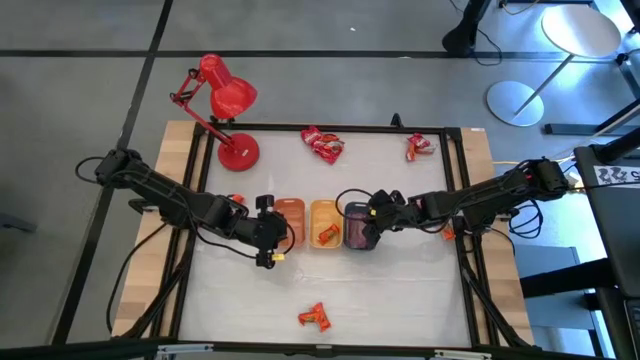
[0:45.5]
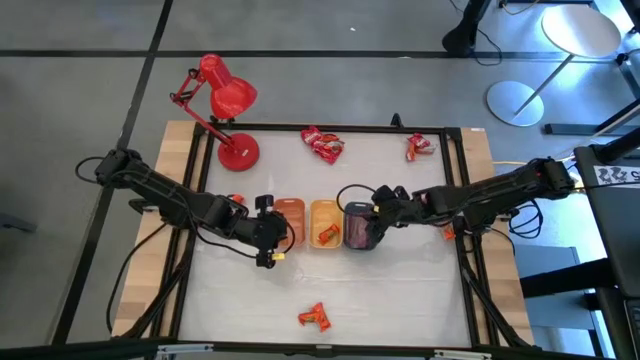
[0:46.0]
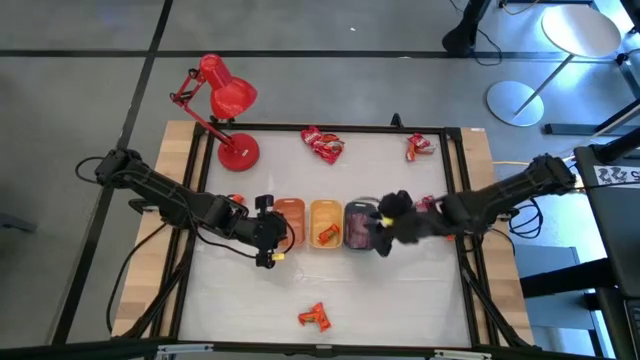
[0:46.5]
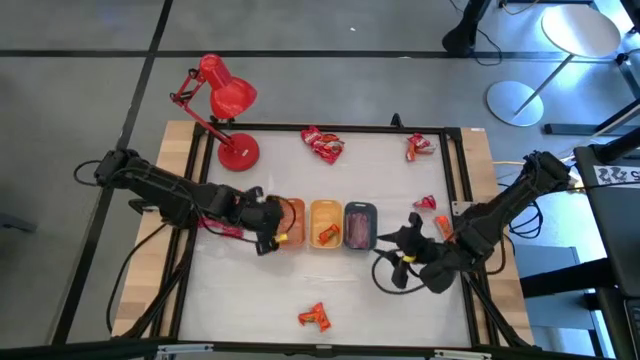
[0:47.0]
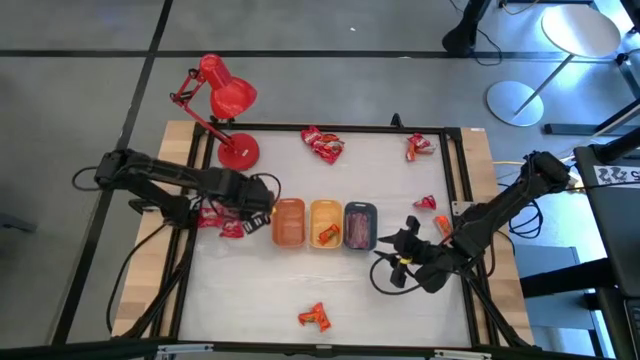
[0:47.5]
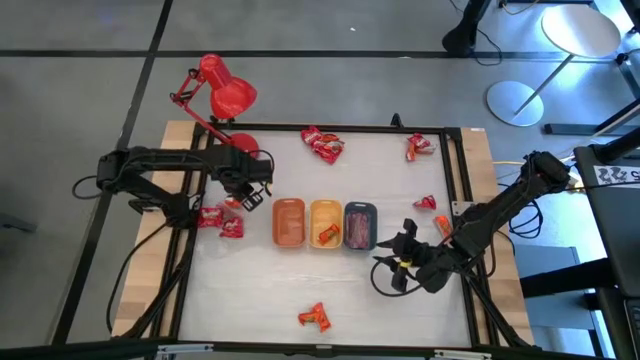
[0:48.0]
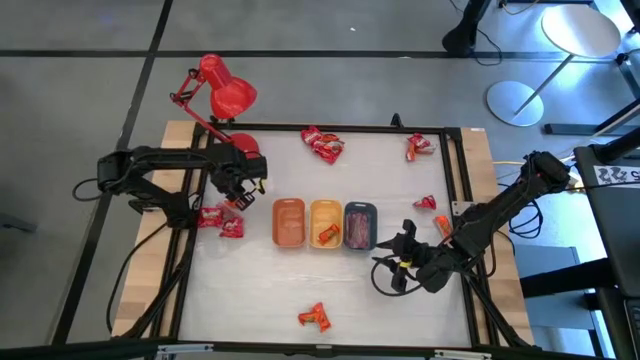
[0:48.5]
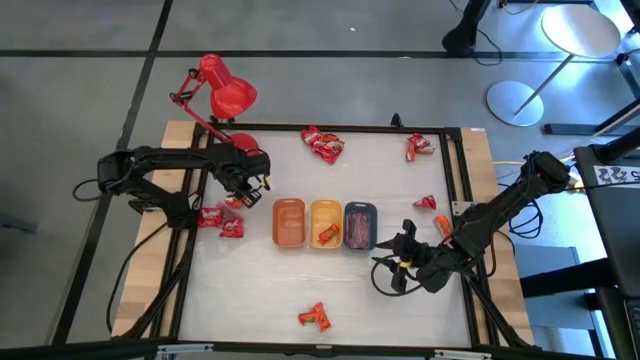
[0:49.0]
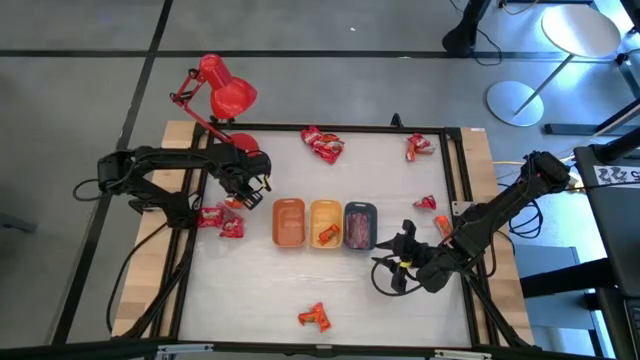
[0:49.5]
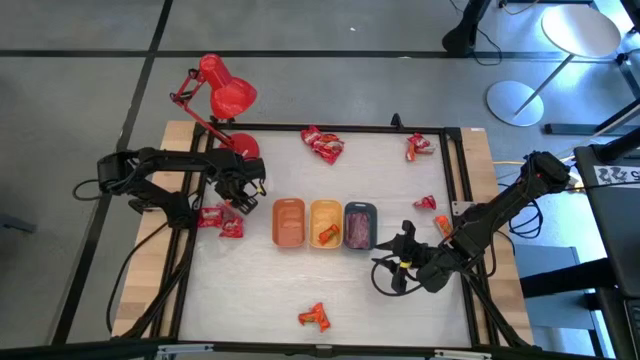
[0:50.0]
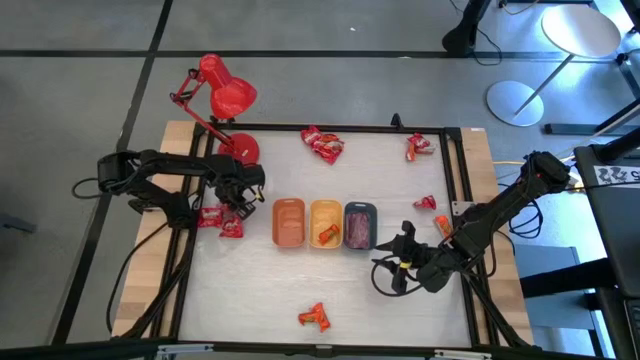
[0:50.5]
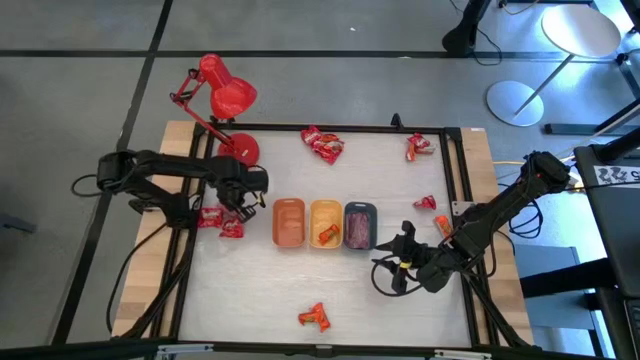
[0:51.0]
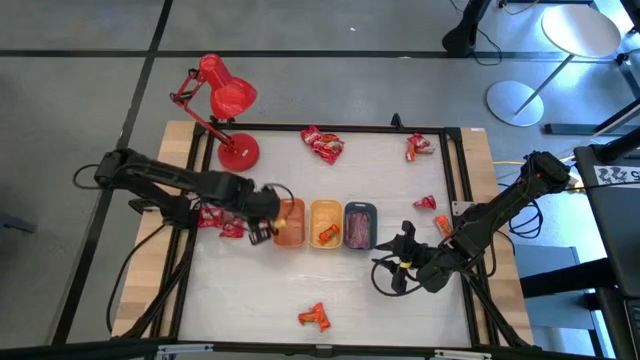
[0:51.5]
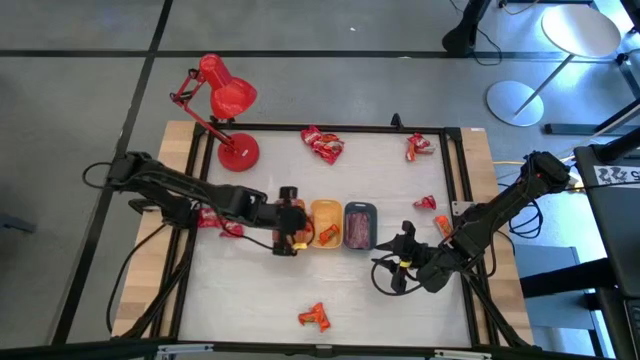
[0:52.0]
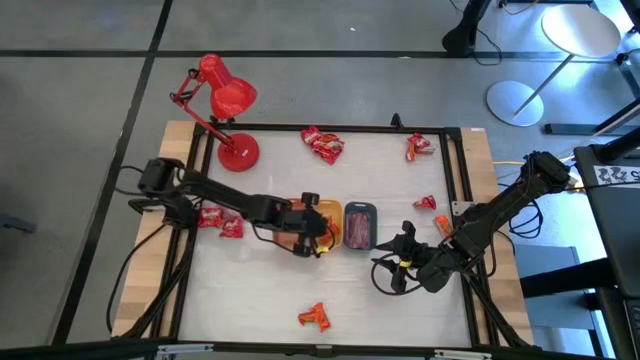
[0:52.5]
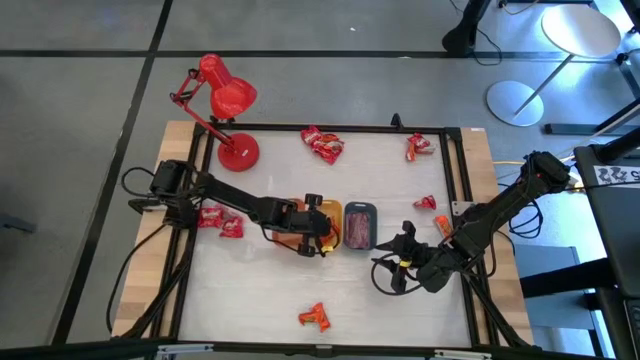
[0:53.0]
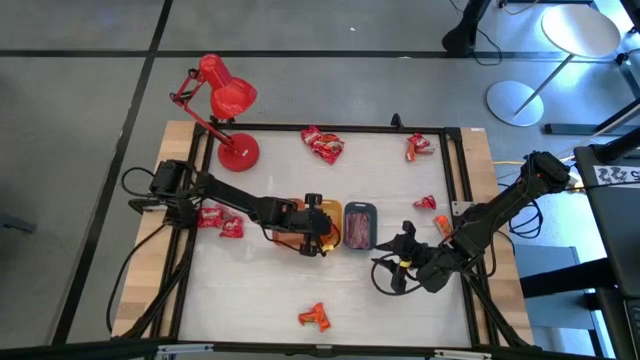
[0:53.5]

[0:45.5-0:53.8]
Task: Sort candy
Put the orange candy into the yellow bin

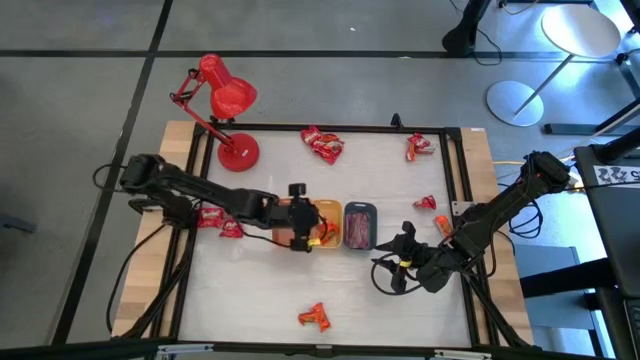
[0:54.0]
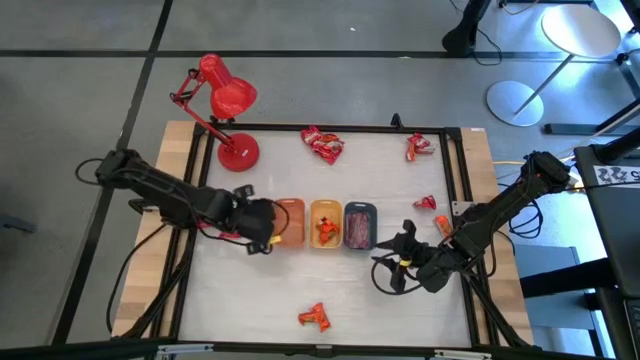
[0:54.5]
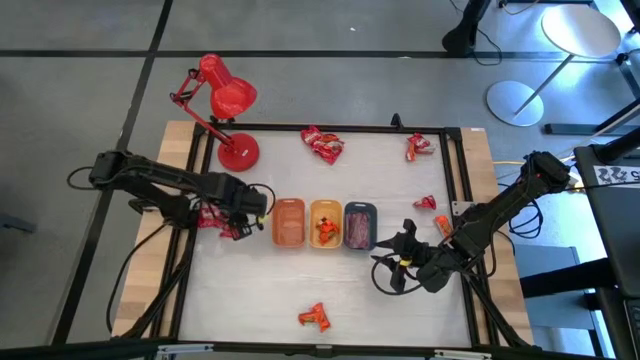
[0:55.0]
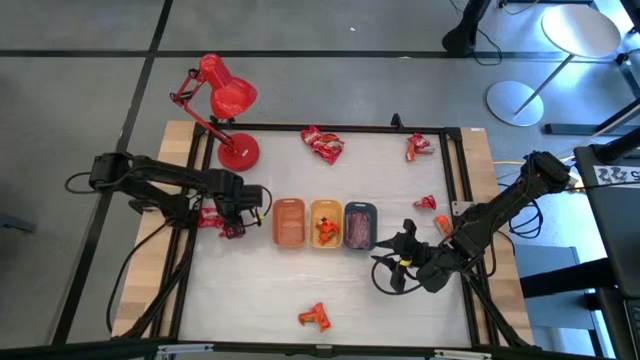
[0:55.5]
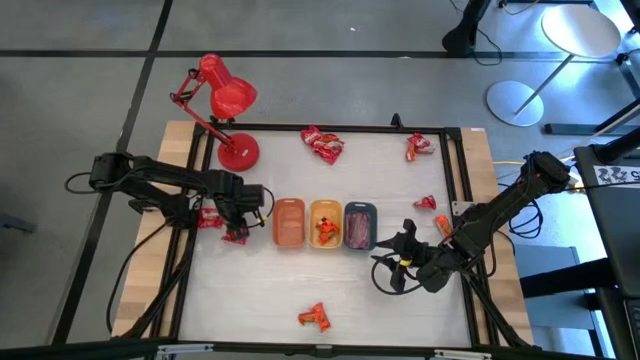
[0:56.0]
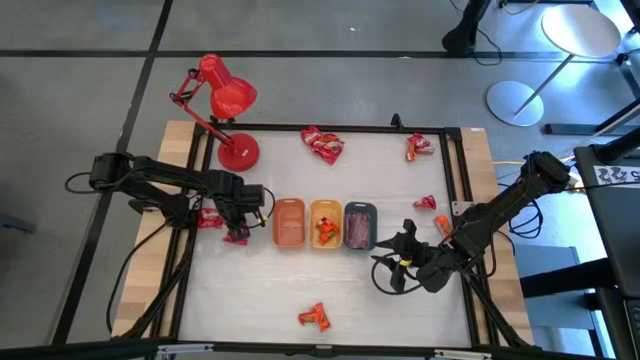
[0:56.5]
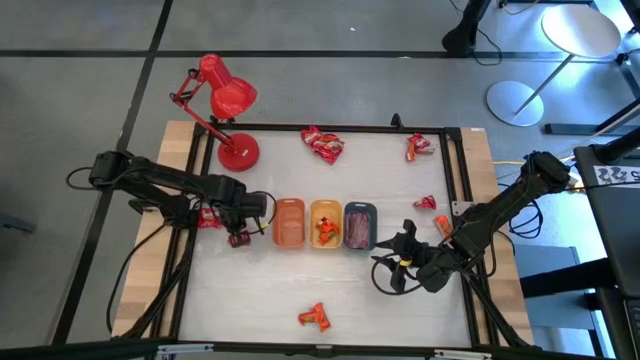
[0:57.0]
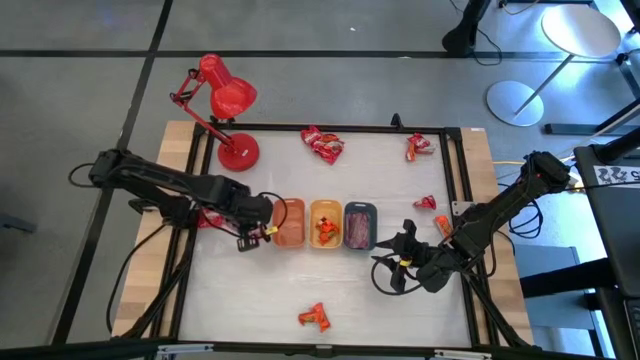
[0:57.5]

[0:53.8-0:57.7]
Put the red candy into the orange bin

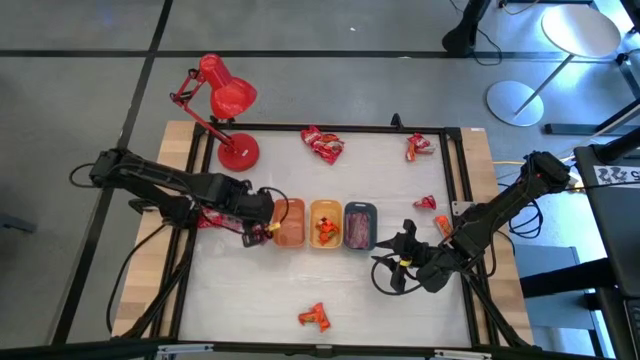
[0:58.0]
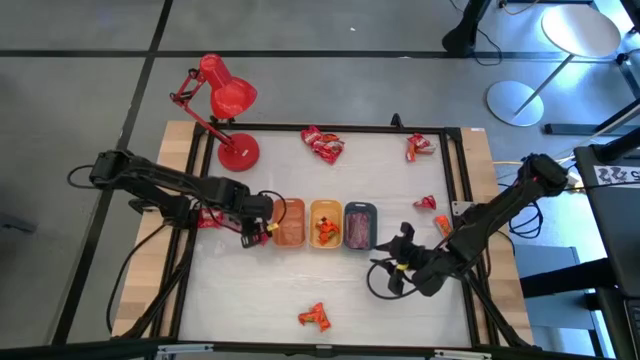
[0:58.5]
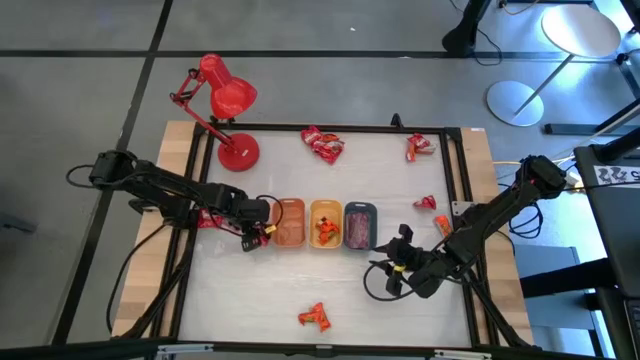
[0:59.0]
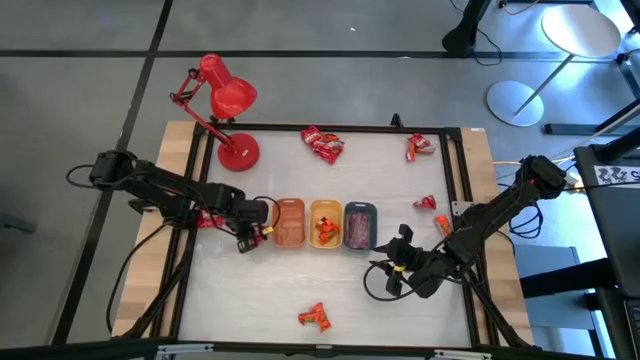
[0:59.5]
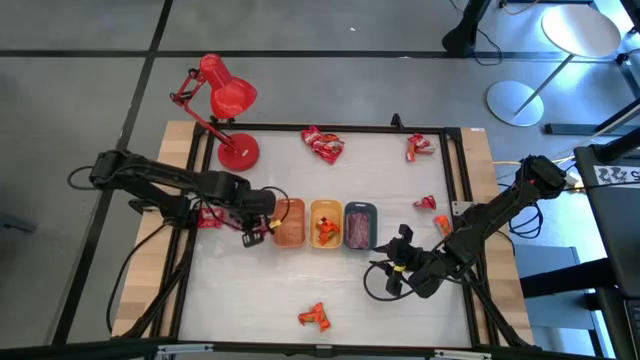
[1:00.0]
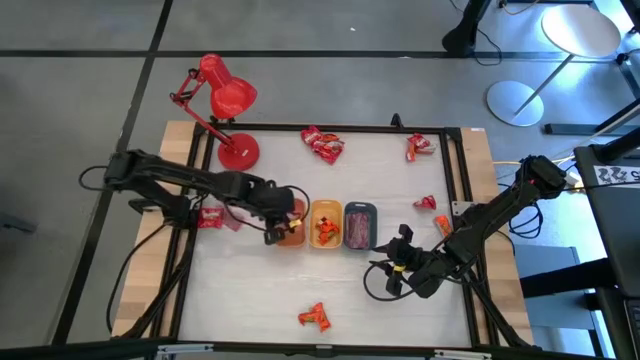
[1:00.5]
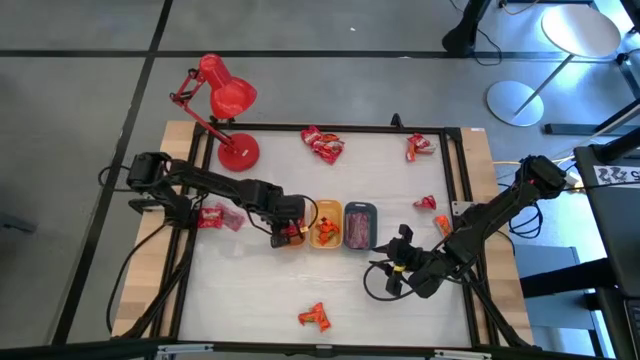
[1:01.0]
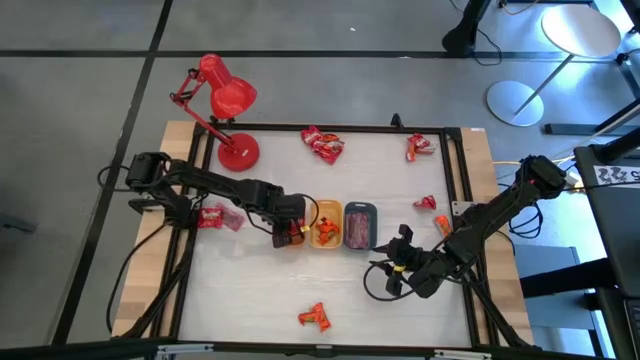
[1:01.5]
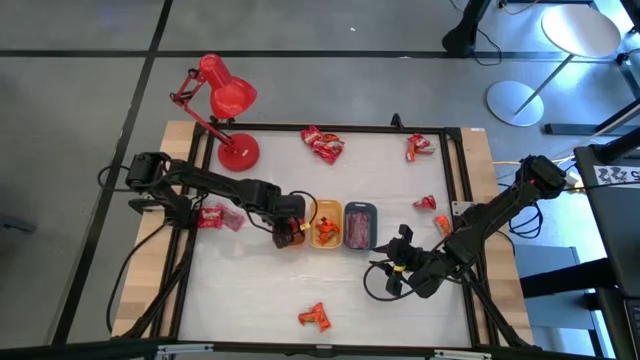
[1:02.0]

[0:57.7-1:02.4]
Put the red candy into the orange bin

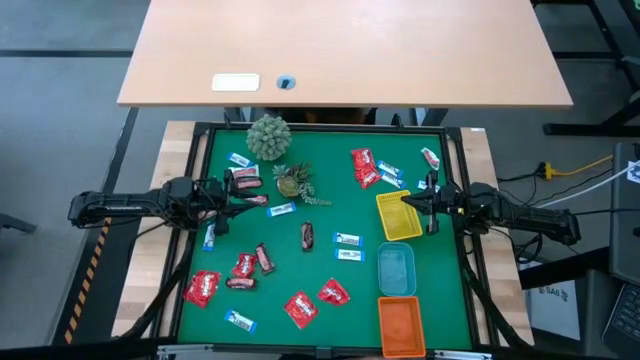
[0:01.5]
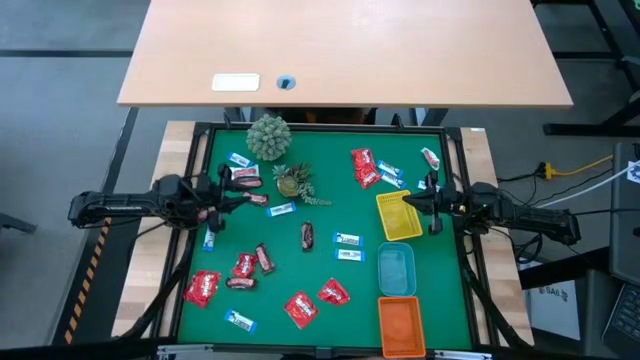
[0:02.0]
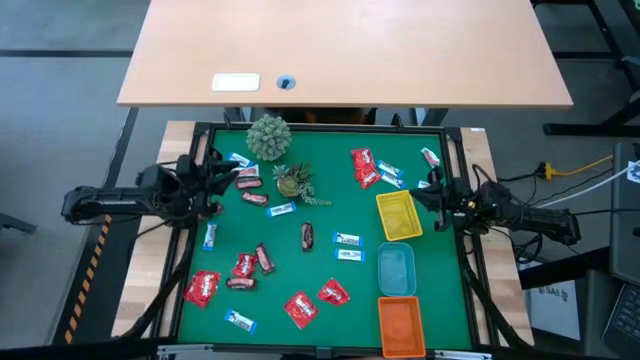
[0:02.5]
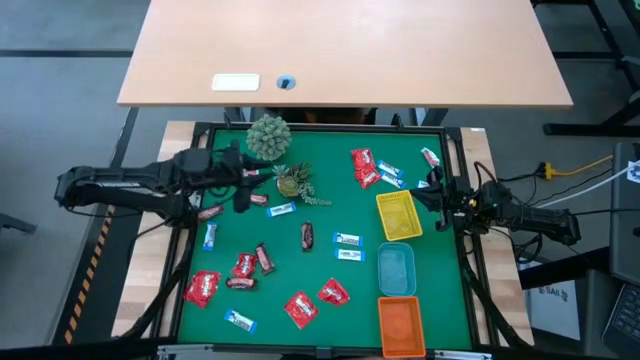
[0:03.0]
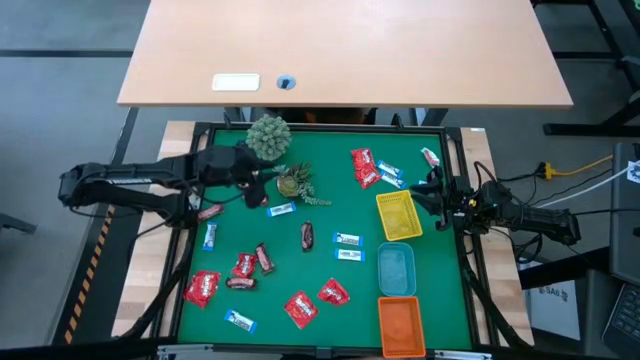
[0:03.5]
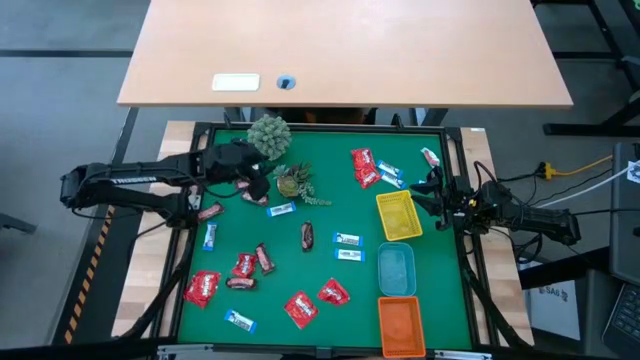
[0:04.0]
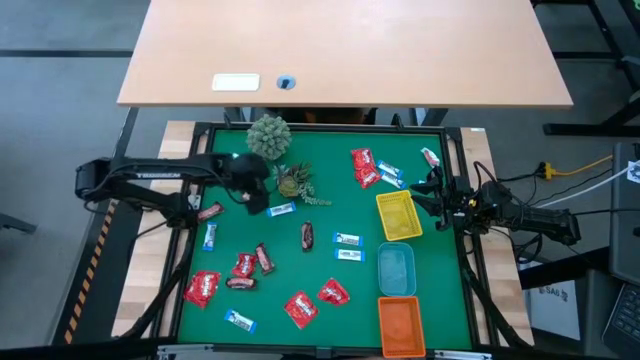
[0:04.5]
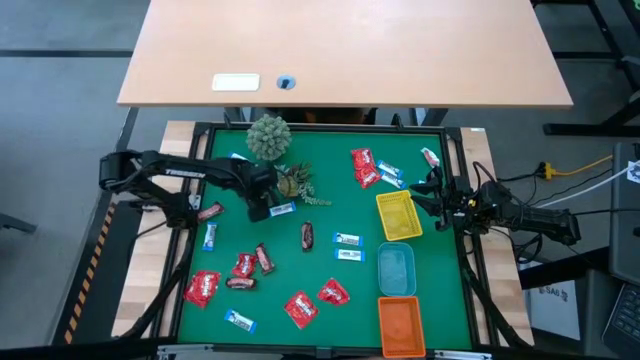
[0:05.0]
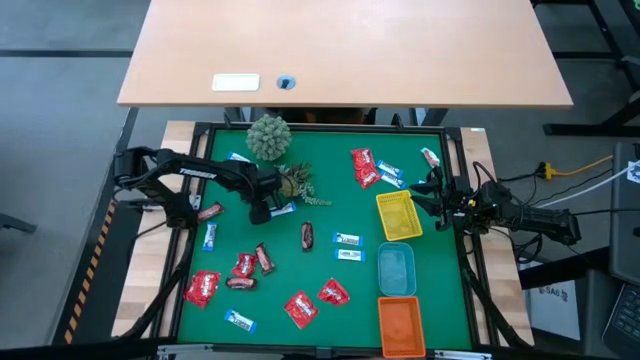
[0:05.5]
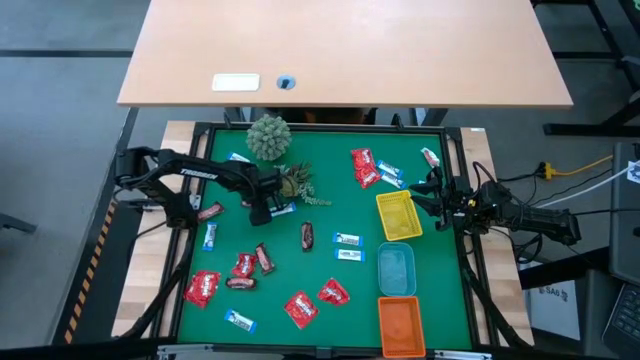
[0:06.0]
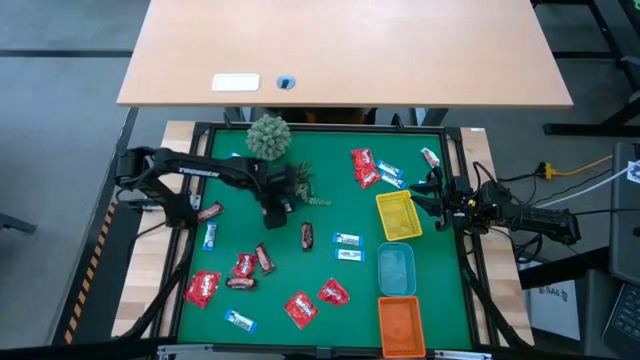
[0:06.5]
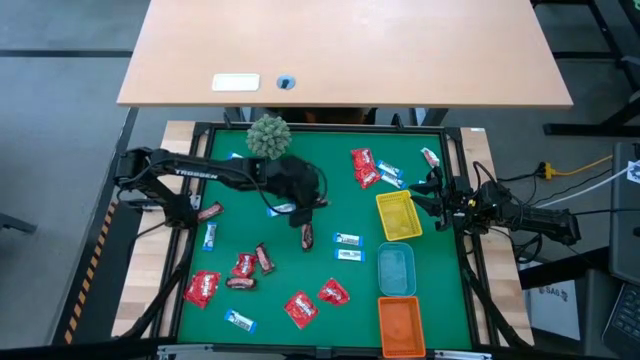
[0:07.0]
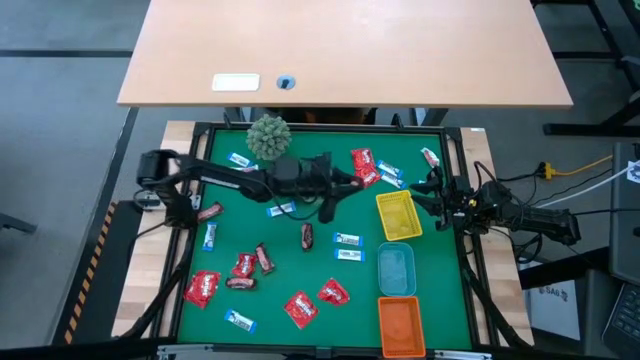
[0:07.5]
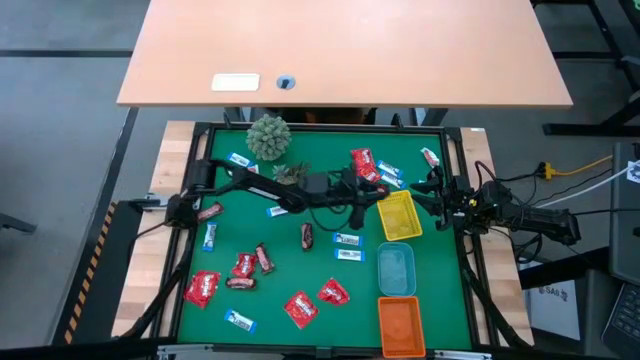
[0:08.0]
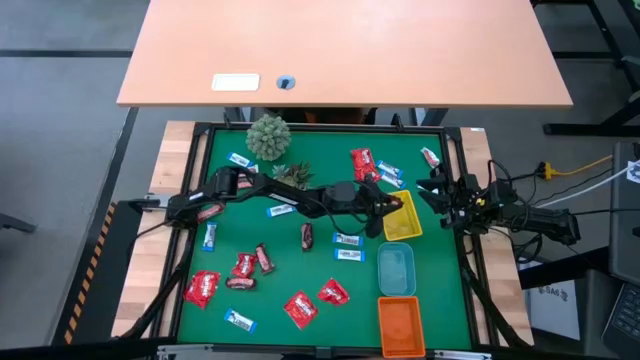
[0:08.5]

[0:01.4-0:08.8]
Task: Sort candy
Put the brown candy into the yellow bin
